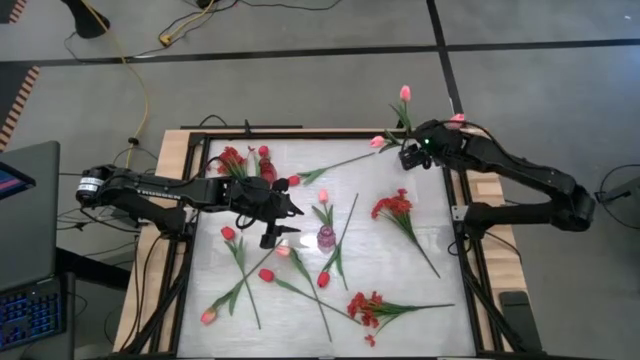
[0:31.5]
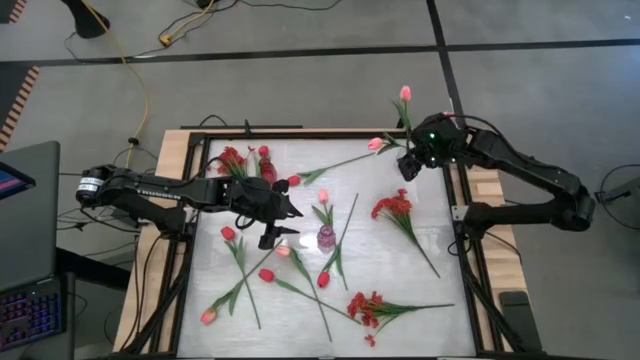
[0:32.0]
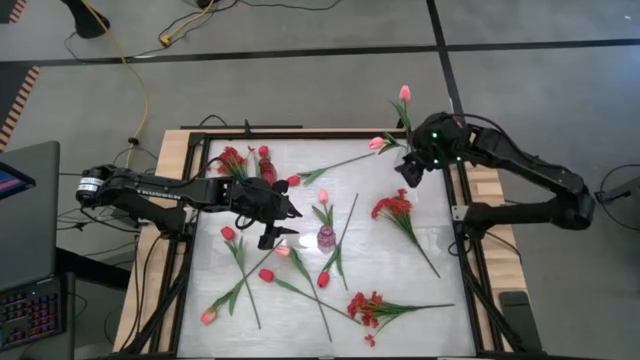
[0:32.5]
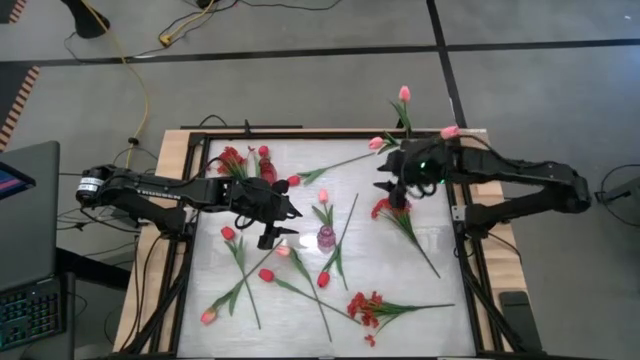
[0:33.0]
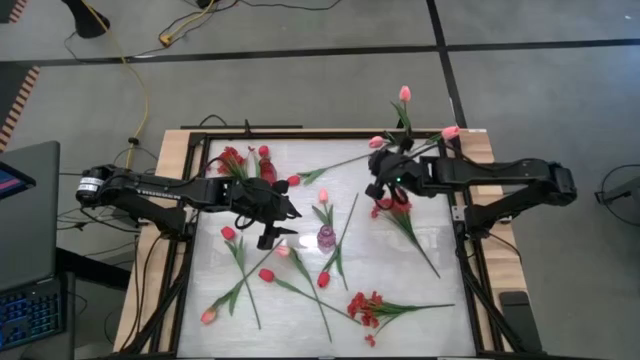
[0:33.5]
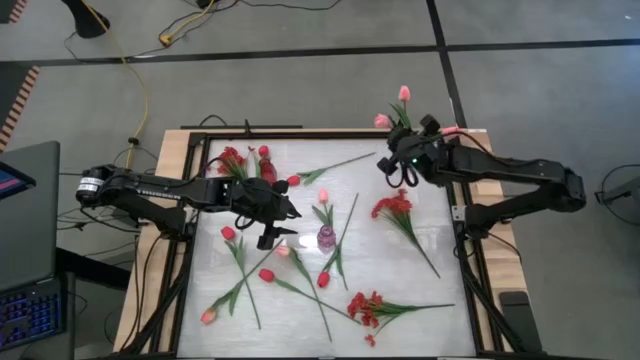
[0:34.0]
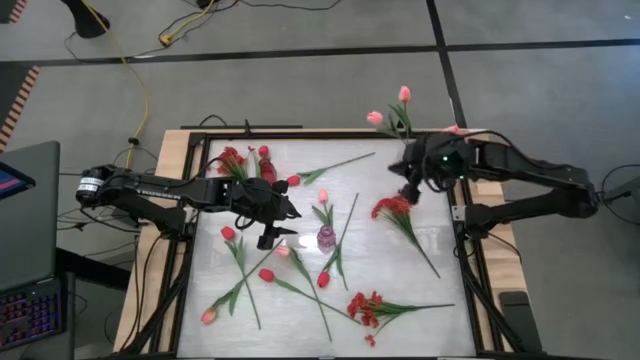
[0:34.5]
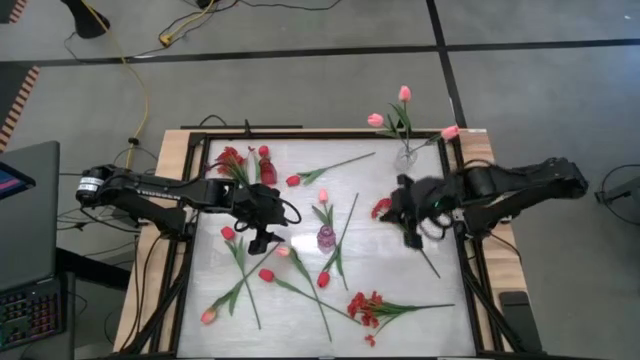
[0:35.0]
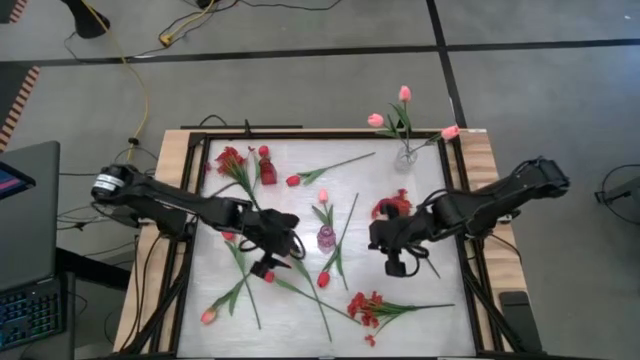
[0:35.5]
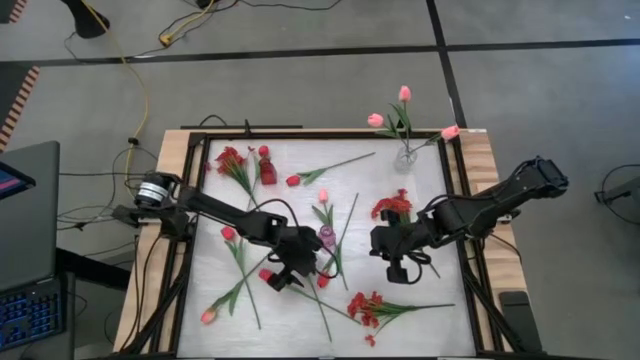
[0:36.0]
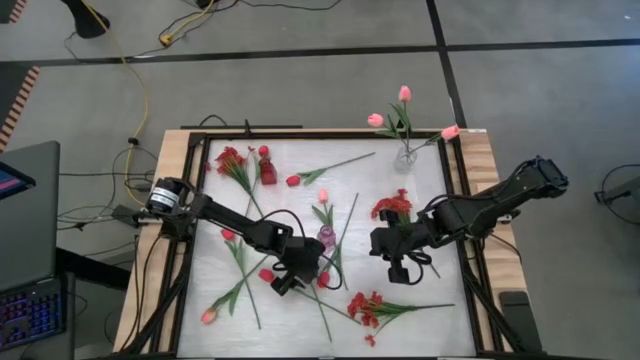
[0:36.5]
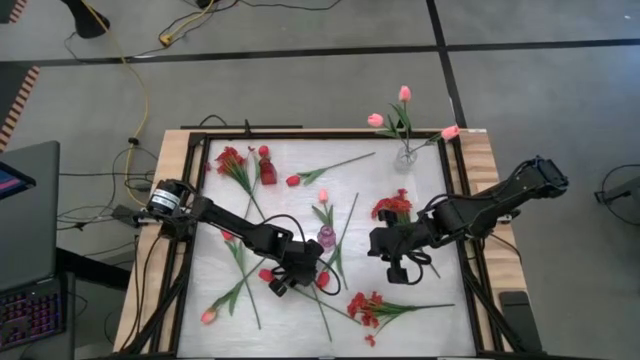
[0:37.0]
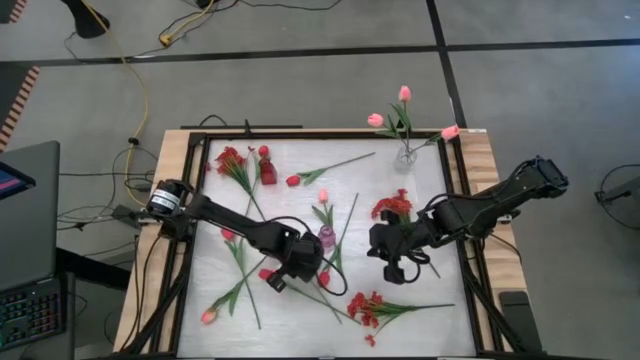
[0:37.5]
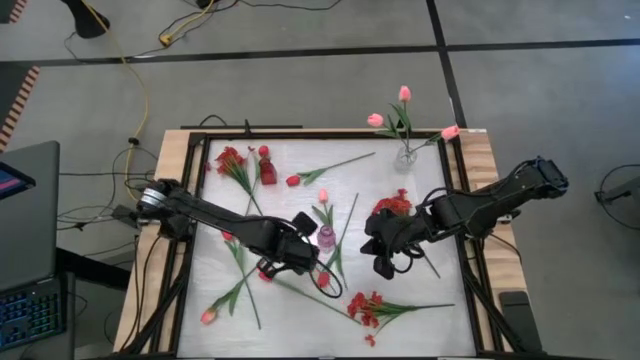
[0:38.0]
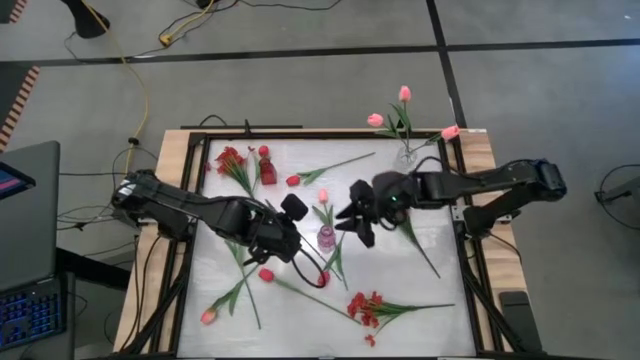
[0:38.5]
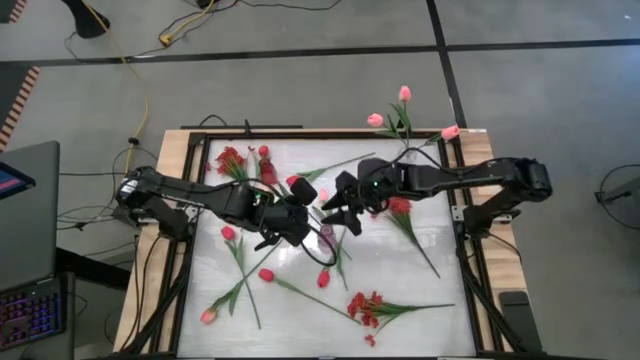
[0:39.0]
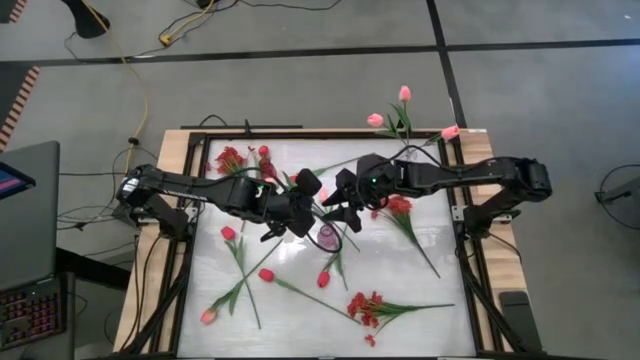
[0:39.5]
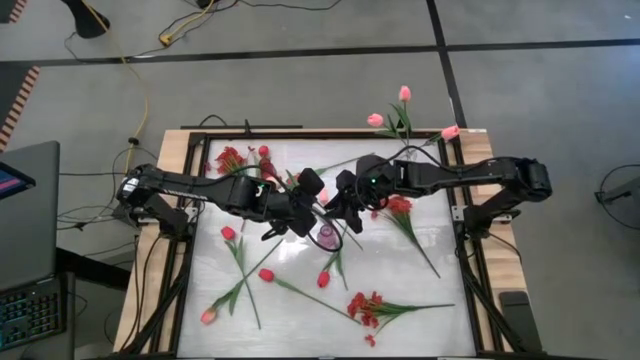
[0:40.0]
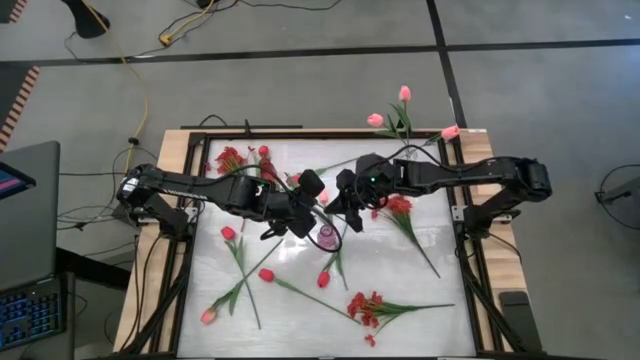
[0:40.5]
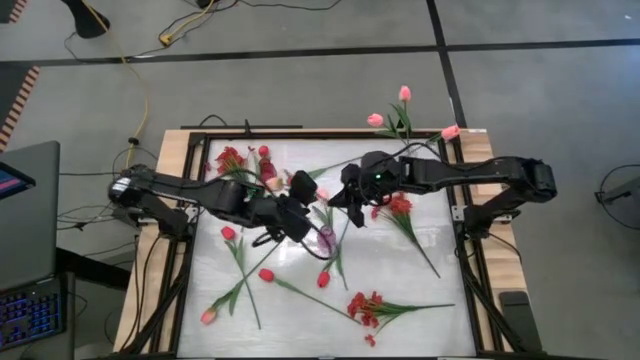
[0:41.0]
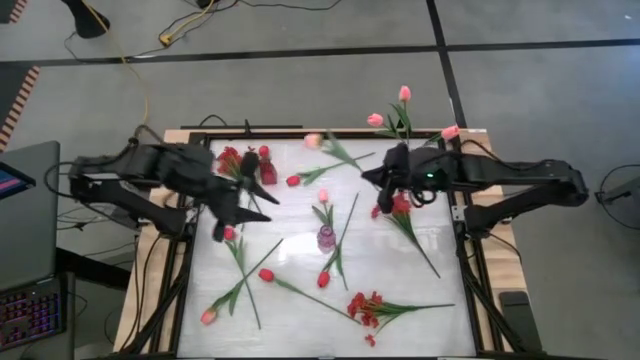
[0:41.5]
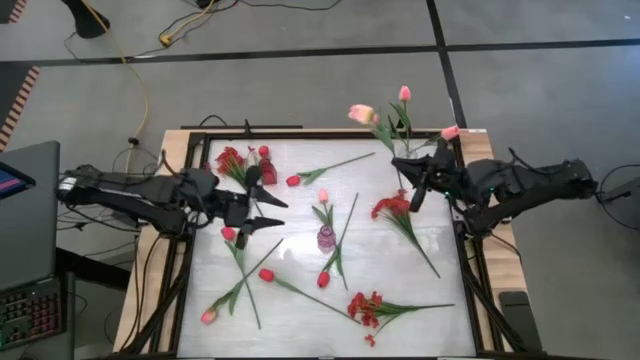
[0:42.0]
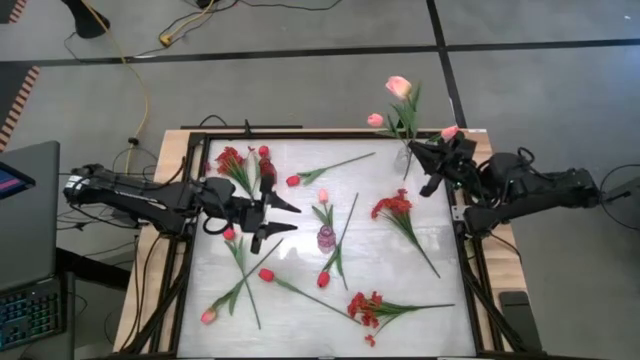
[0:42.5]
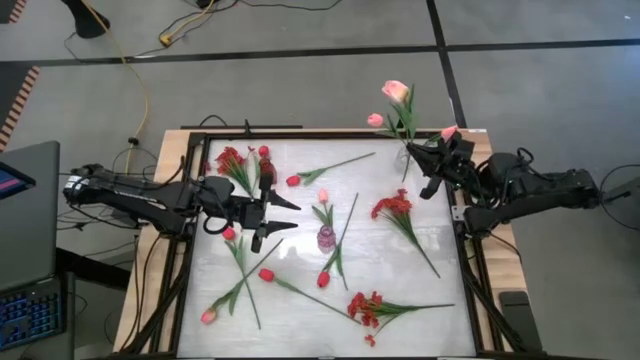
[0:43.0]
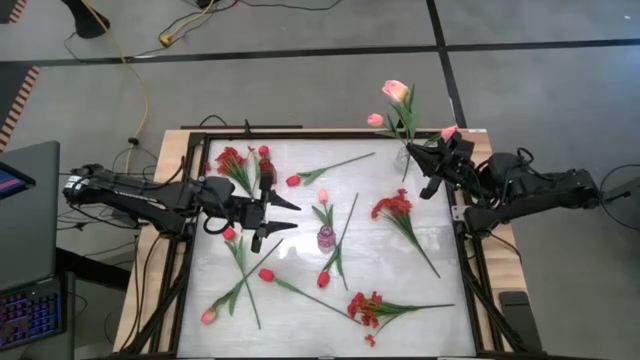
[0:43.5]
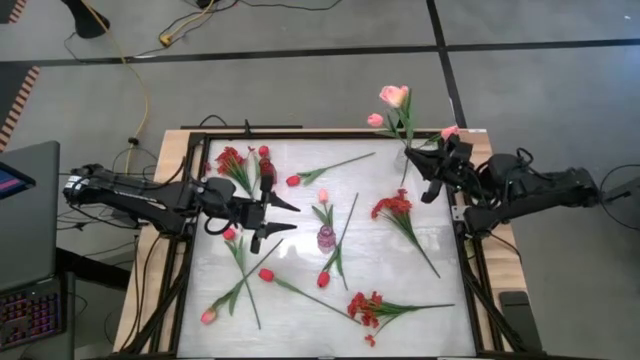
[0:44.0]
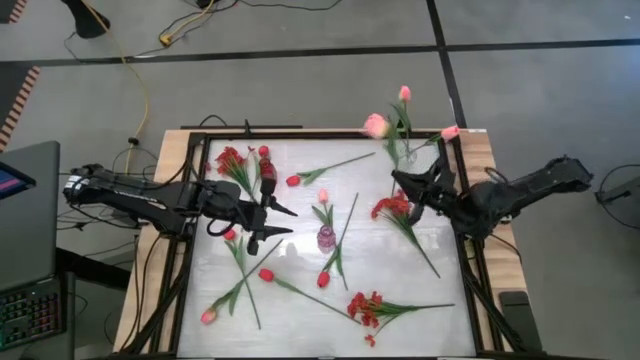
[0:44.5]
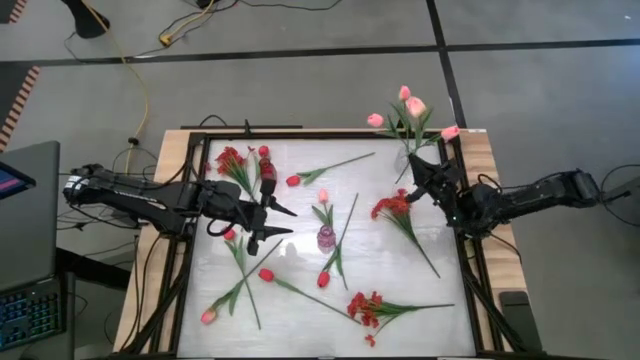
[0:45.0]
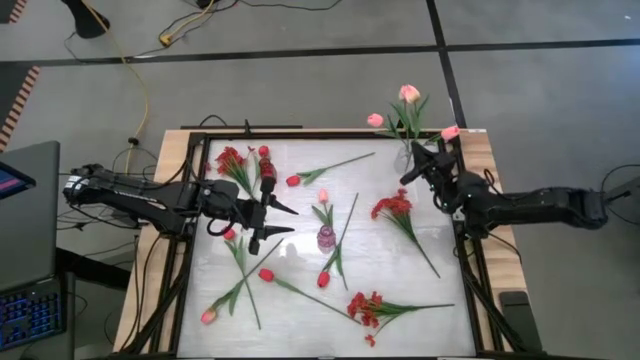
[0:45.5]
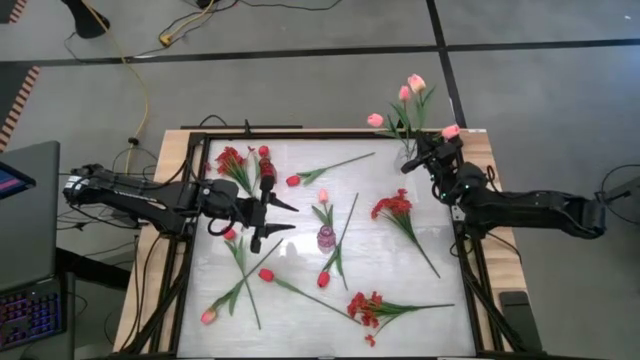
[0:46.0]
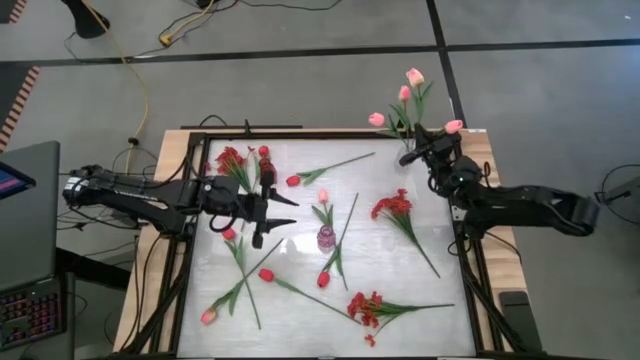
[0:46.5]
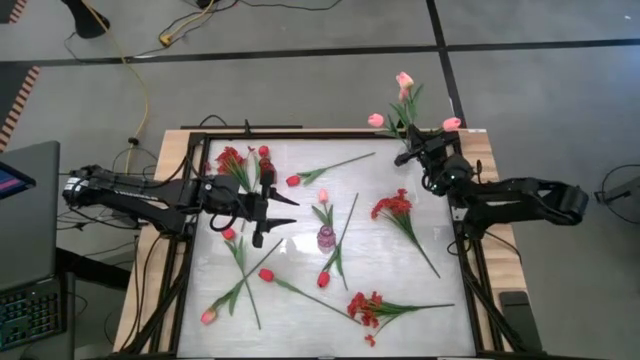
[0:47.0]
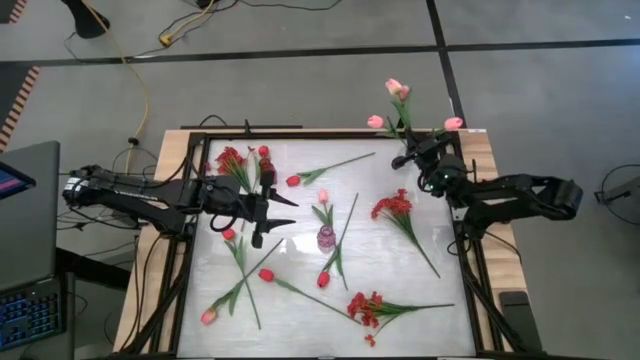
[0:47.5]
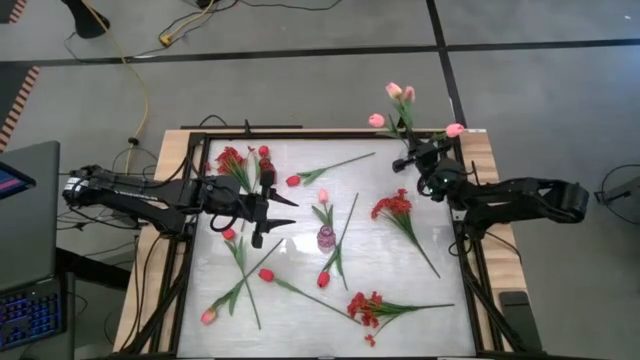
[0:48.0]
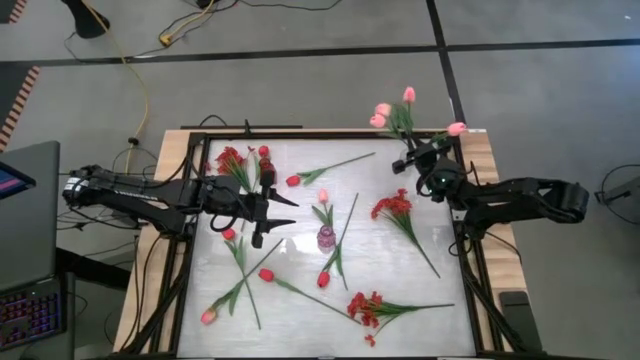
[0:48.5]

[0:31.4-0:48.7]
Task: Sort flowers into vase by color
Put the pink flower into the transparent vase

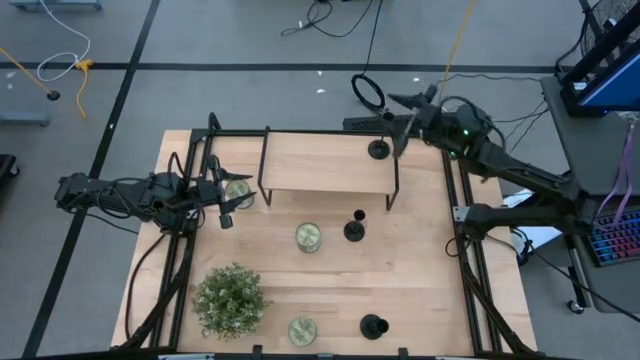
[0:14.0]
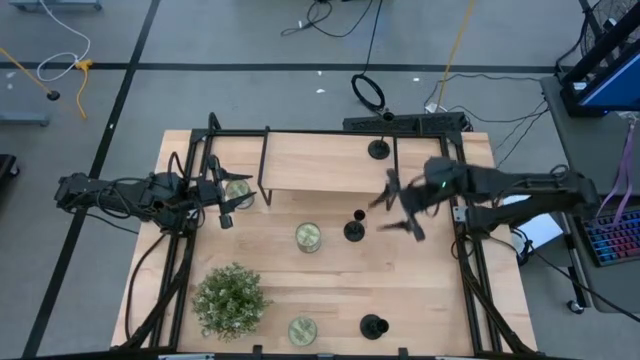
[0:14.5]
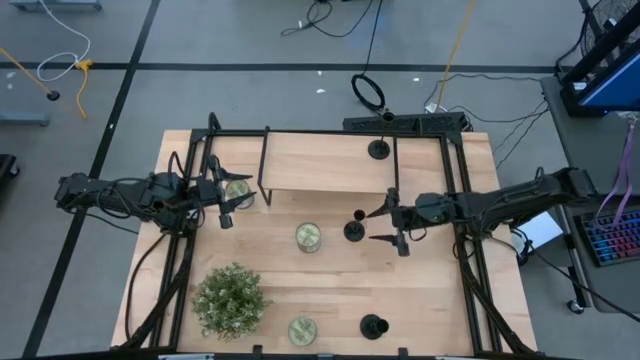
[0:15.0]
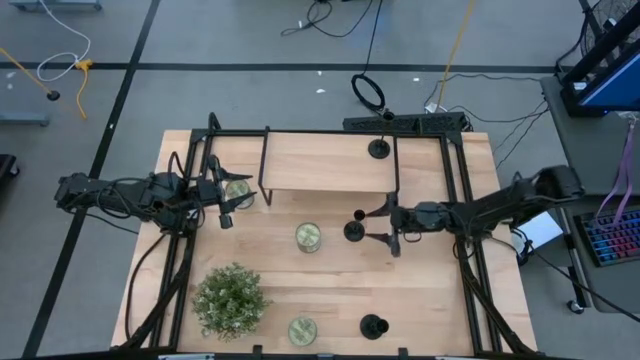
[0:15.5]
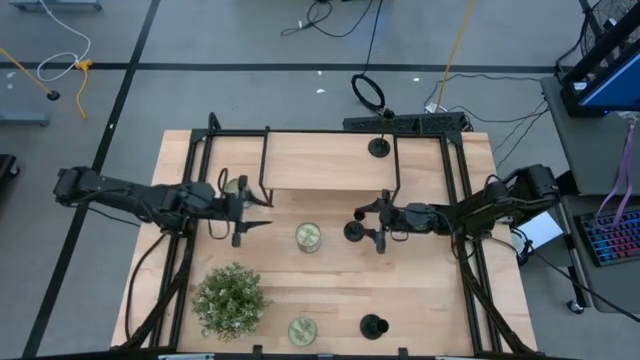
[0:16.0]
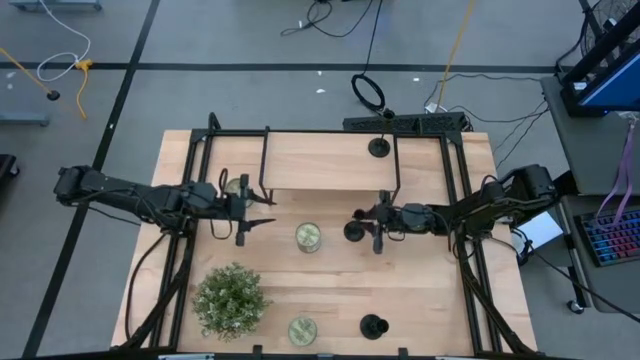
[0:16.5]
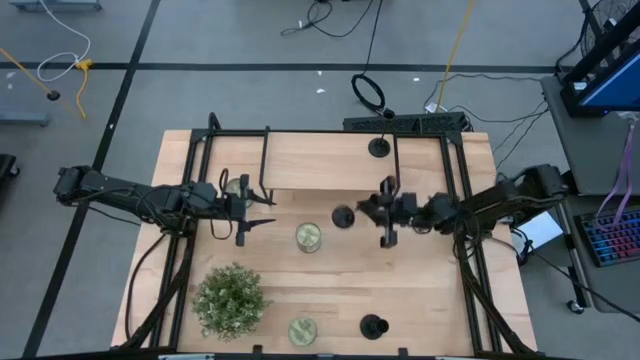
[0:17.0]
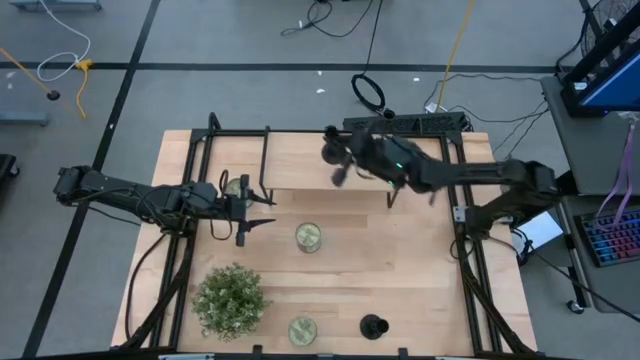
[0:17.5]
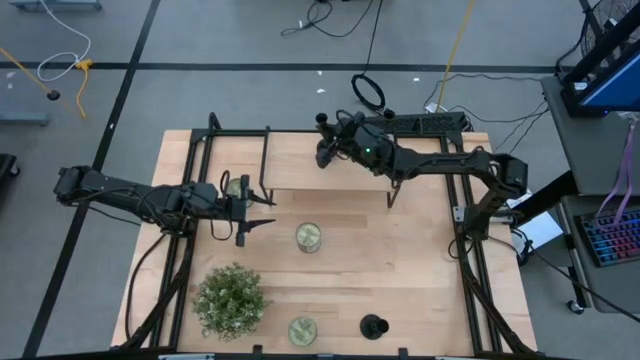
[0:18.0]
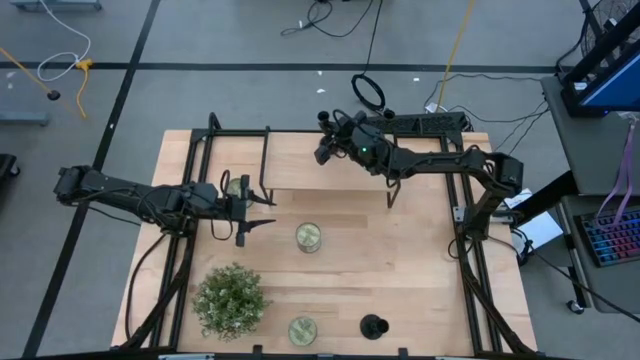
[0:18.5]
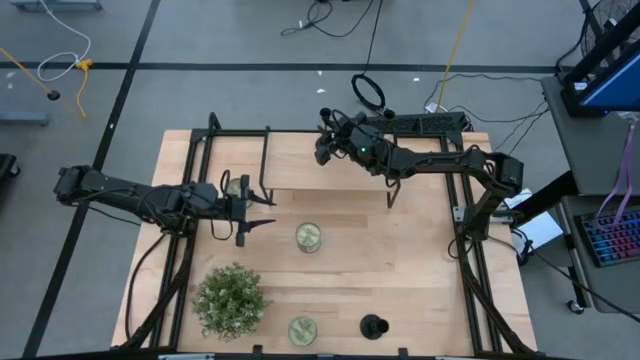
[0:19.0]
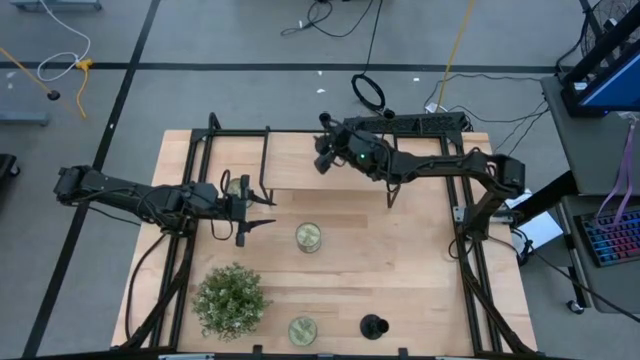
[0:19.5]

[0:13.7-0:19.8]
Task: Pick & Place candle stick holders
Put the top black candle holder on the shelf
